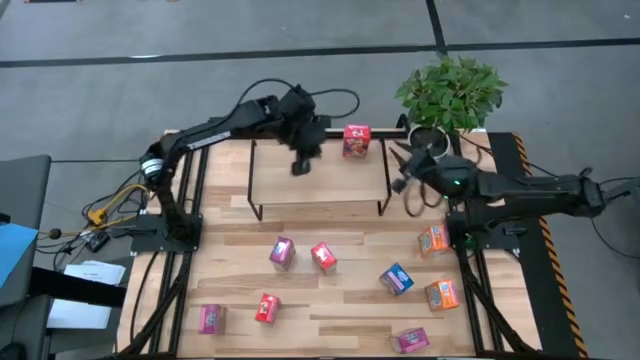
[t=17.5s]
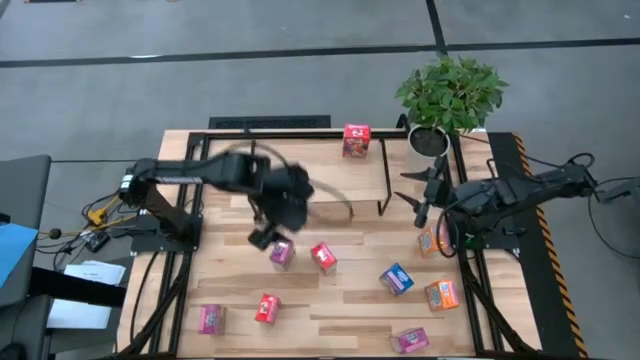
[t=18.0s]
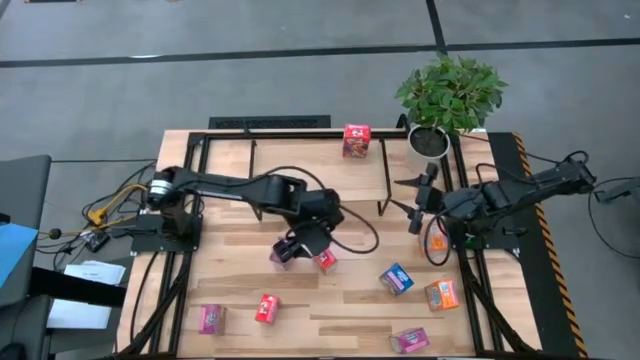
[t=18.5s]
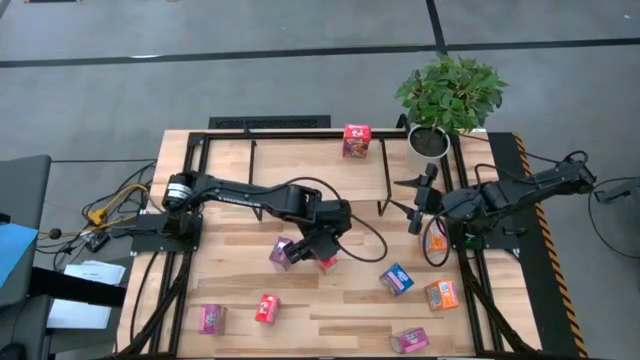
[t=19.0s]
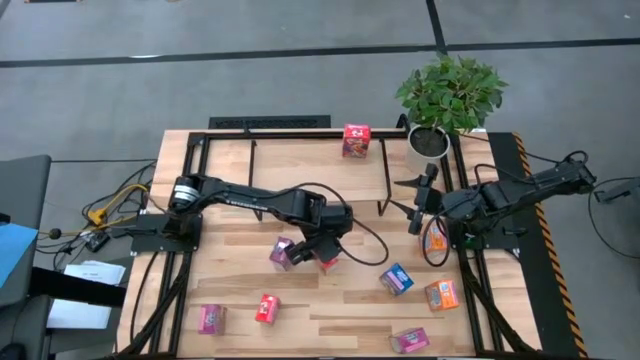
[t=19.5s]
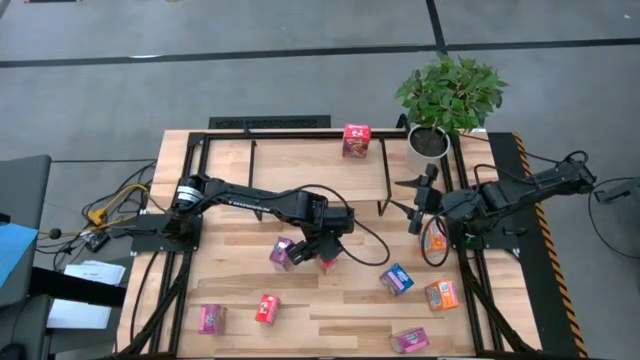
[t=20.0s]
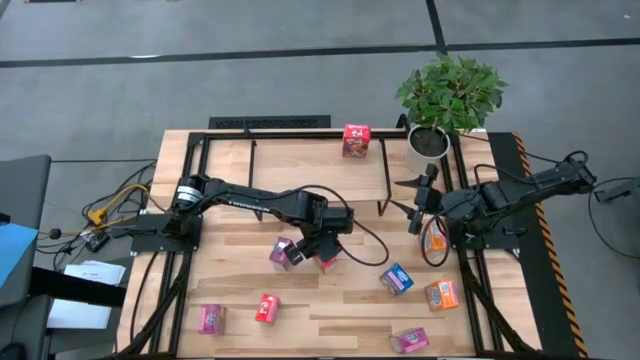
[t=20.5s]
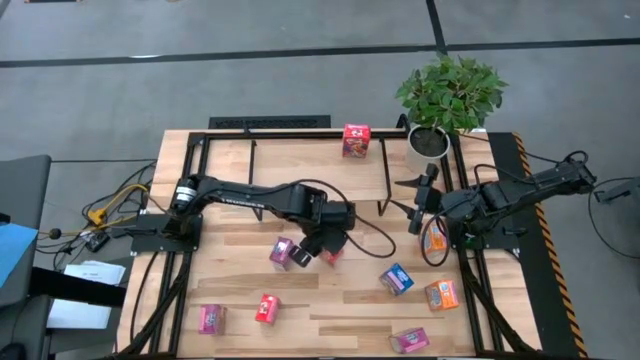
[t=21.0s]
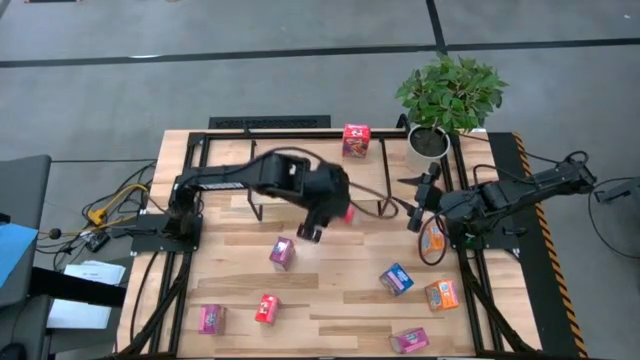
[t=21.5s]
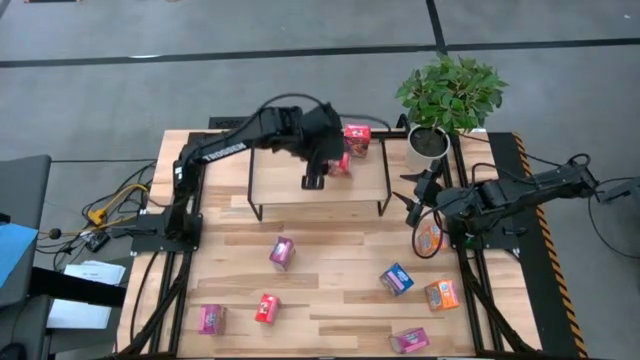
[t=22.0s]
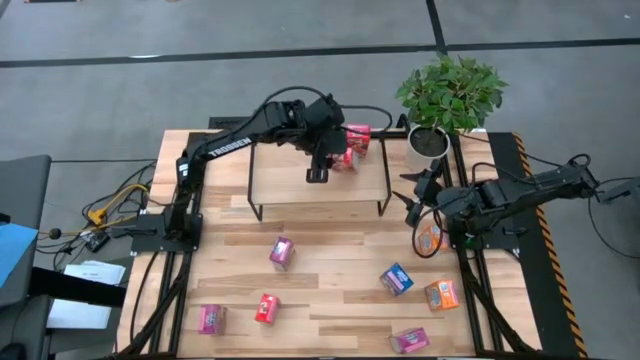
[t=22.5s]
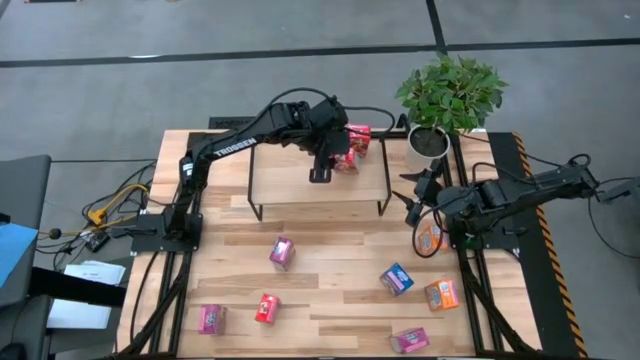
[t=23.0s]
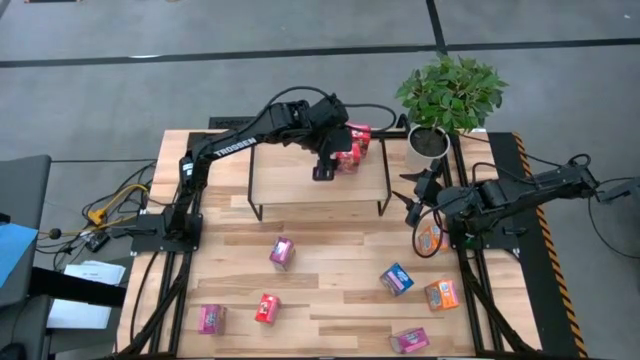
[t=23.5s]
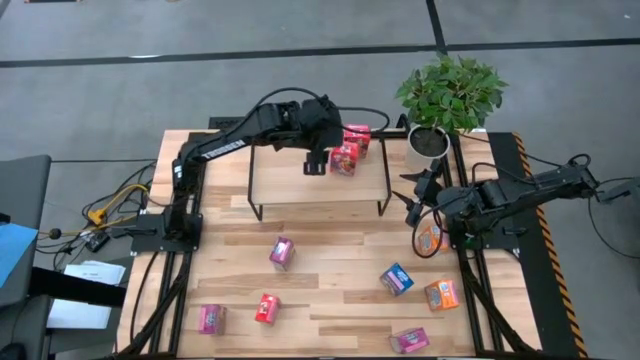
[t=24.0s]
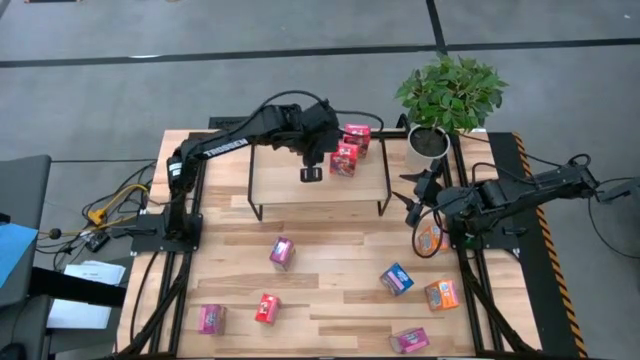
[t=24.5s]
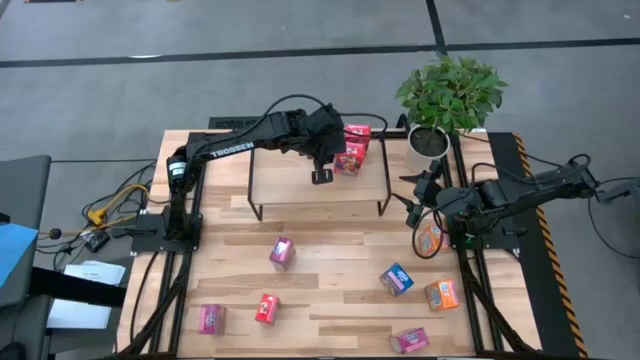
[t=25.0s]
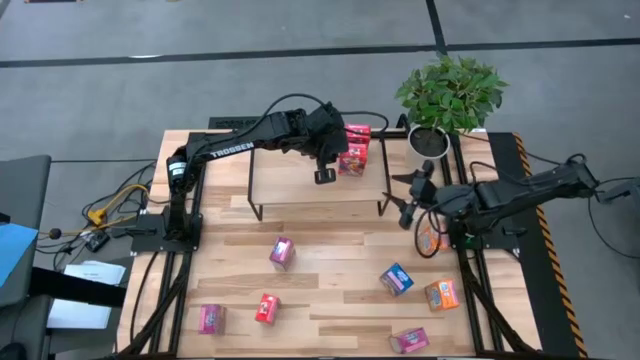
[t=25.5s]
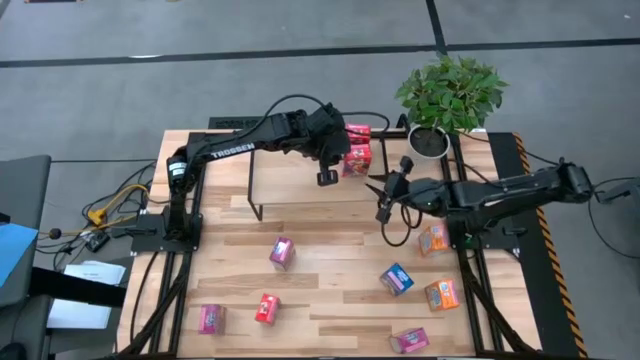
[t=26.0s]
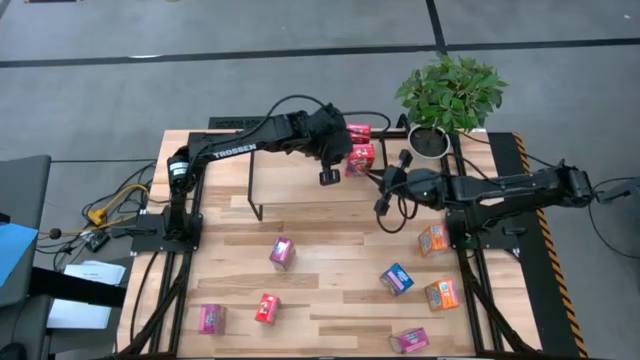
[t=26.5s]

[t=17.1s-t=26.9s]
Task: Stack cereal on shelf
Put the top red center cereal box on the shelf aligned with the other red cereal box

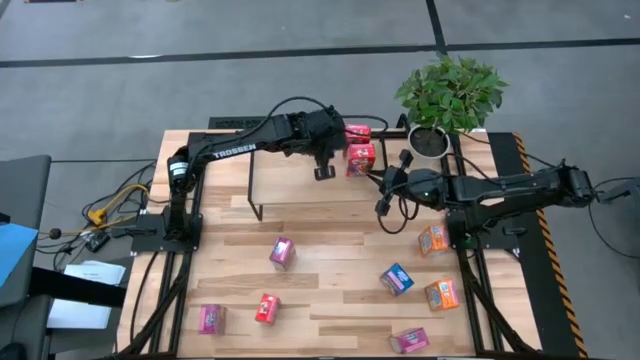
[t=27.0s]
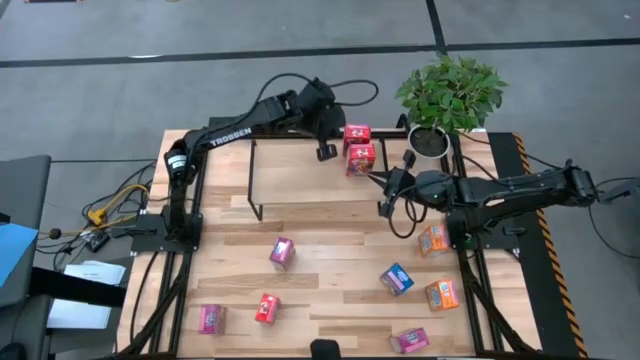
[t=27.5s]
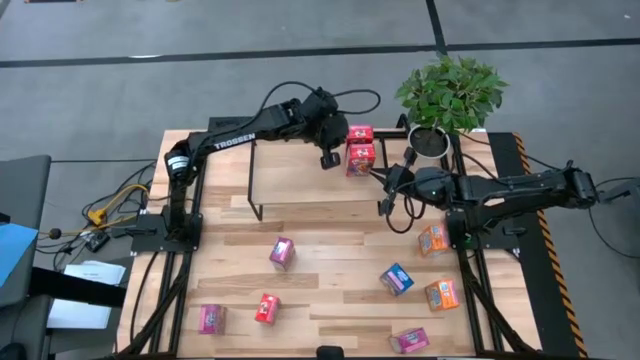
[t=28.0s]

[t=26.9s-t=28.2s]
Adjust the red cereal box on the shelf

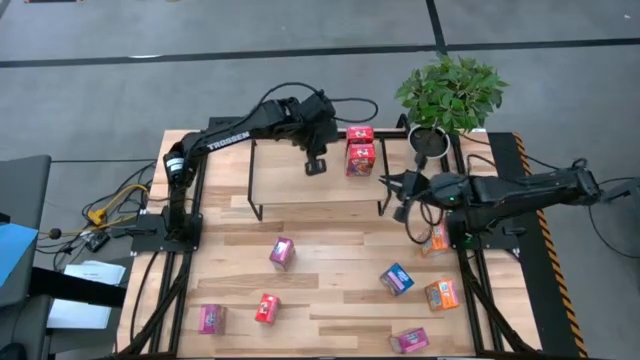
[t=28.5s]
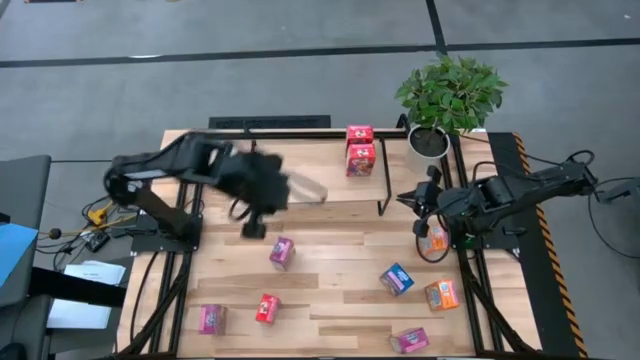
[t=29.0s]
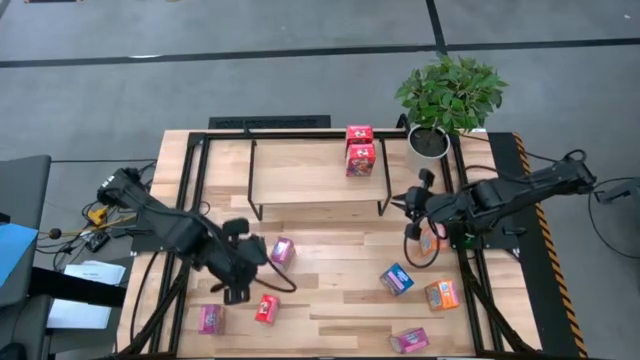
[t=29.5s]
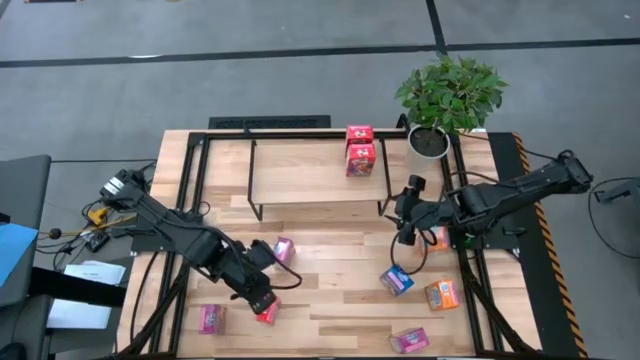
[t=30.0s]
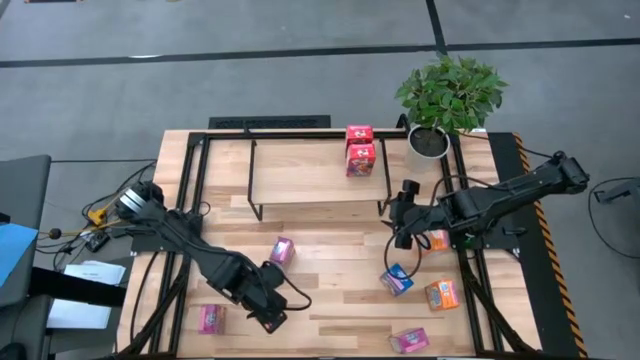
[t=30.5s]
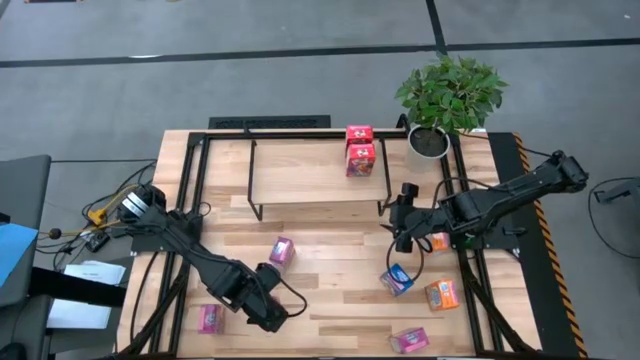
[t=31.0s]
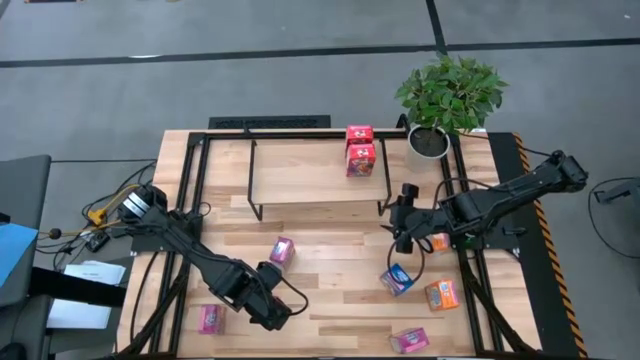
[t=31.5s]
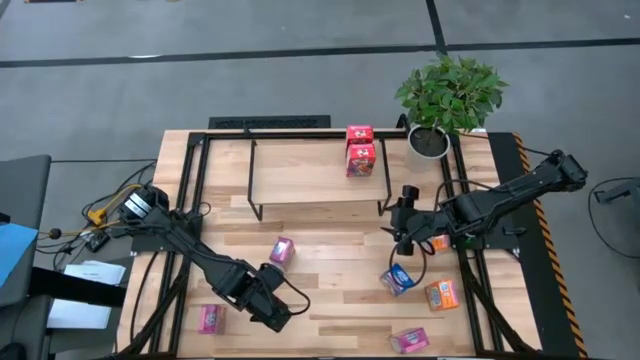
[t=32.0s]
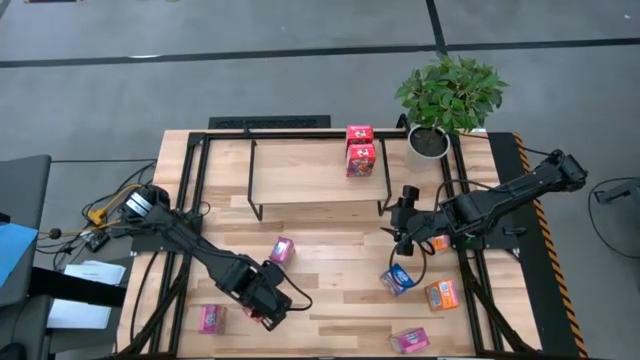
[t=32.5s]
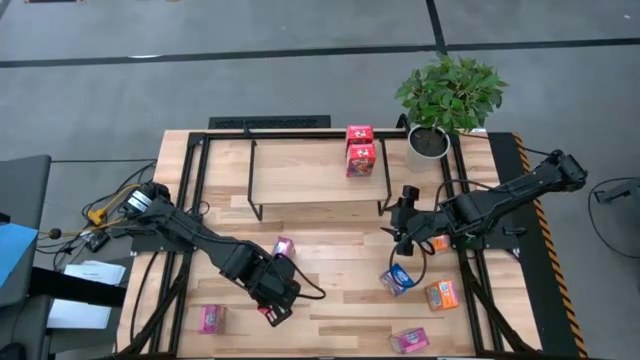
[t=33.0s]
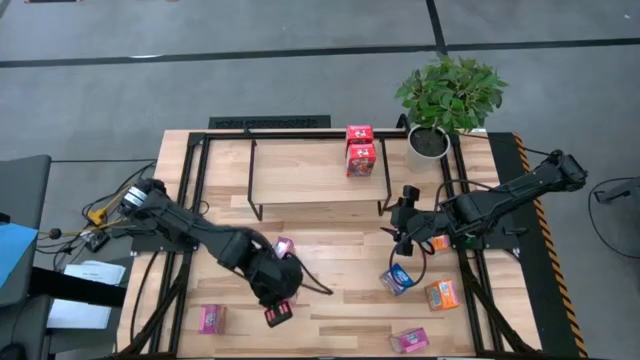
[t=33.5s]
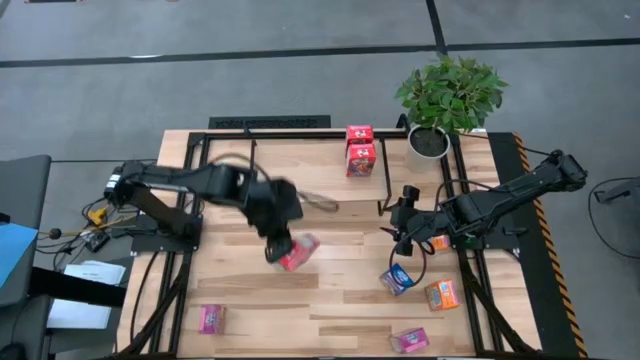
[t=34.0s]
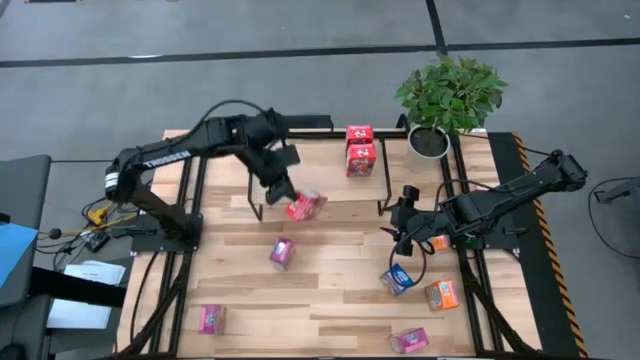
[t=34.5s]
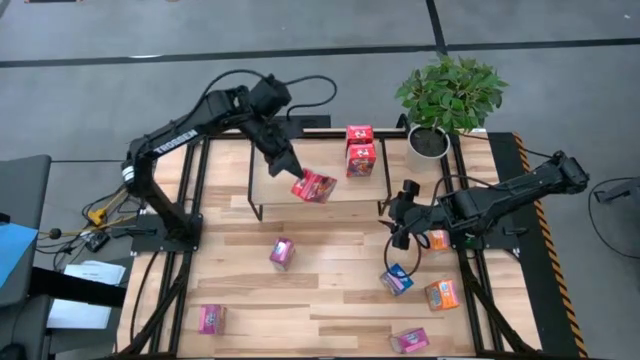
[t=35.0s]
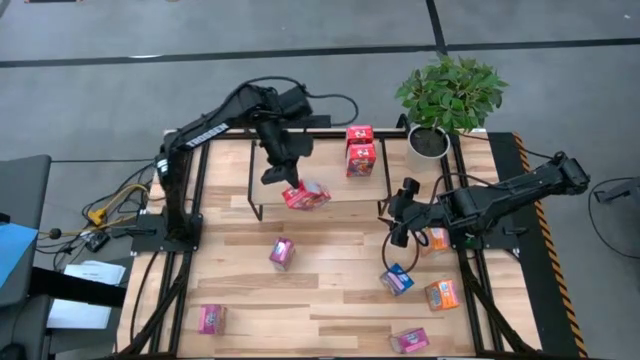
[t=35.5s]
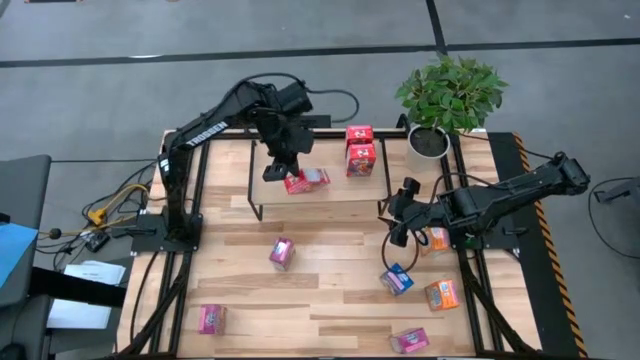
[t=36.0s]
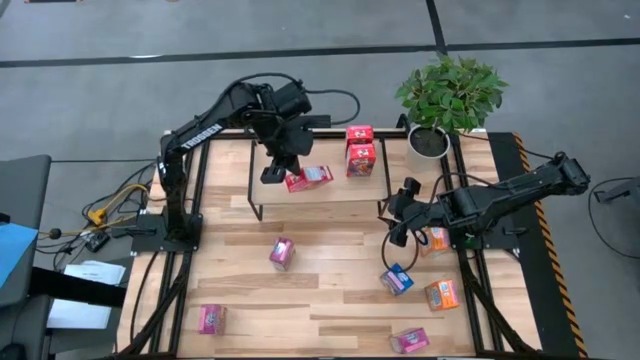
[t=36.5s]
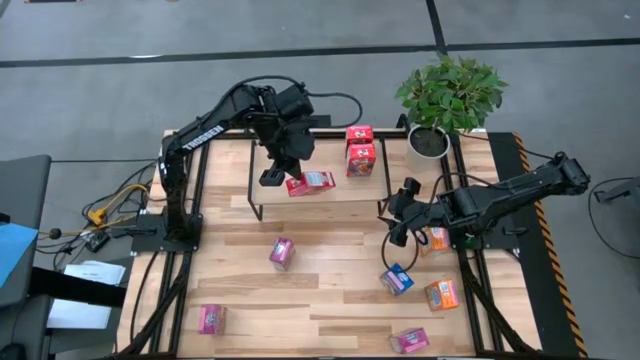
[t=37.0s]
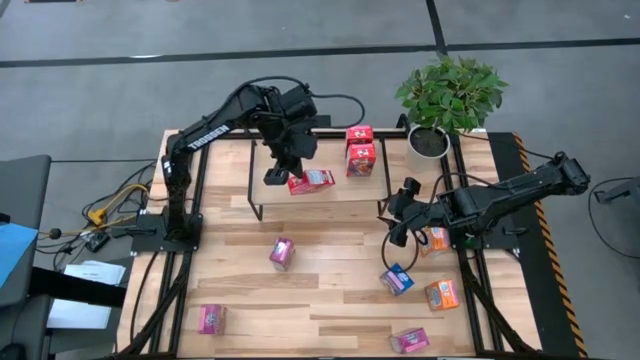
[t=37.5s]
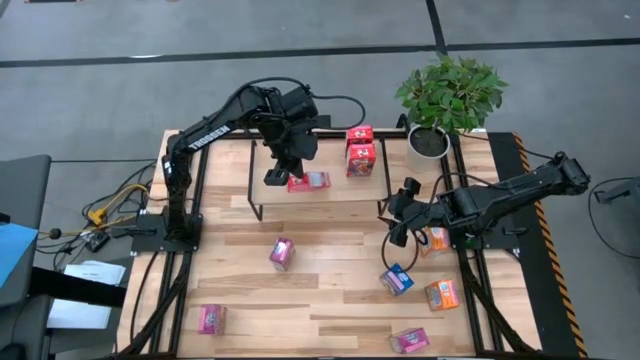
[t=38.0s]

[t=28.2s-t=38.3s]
Put the red cereal box on the shelf

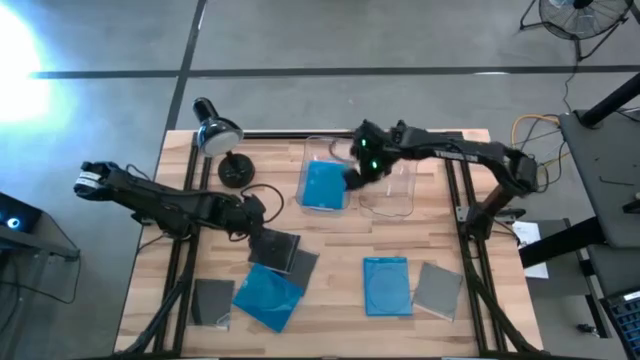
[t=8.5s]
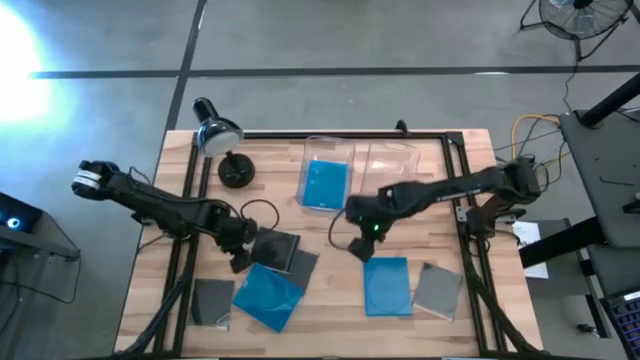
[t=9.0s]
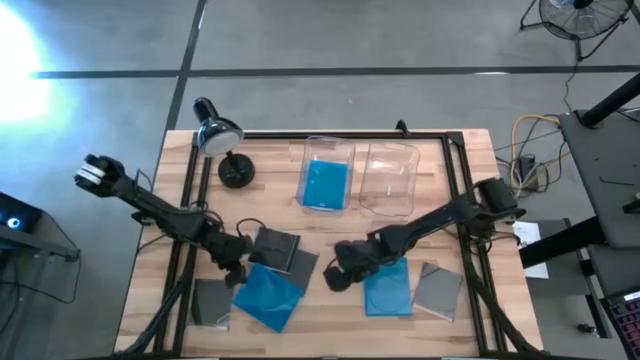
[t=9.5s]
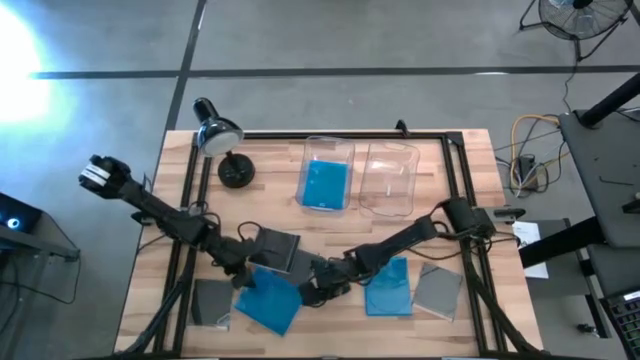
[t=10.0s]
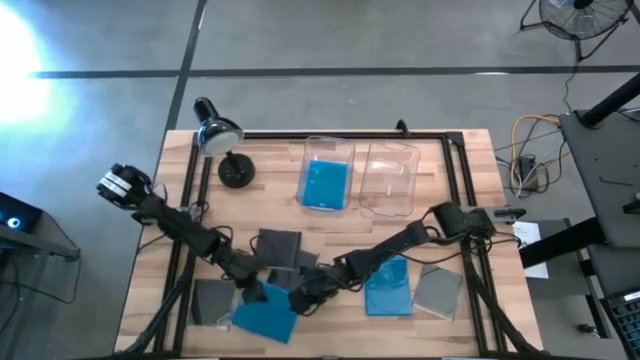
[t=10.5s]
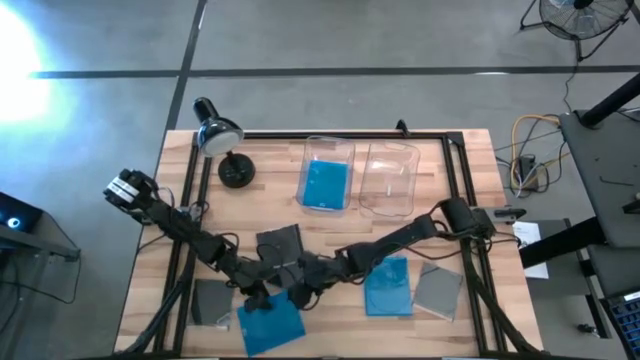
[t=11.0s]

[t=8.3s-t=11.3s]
Task: Pick & place jewel cases by type
Put the blue CD case into the left transparent bin
